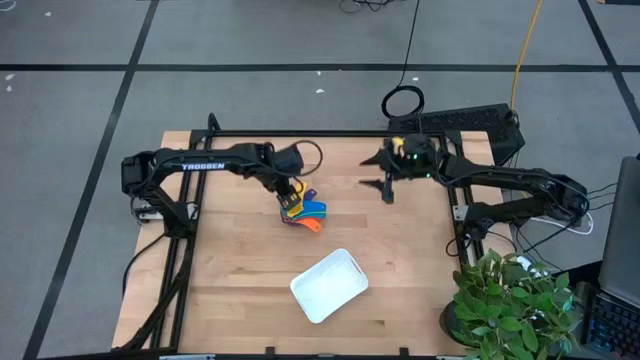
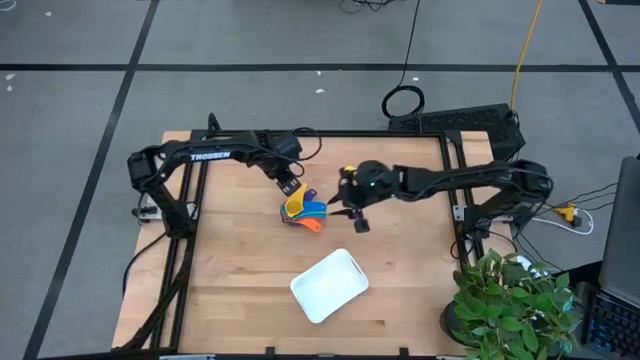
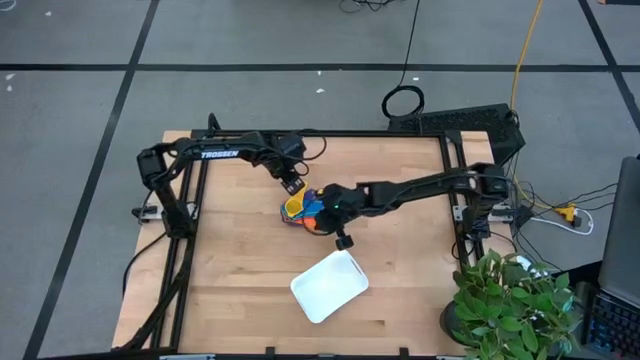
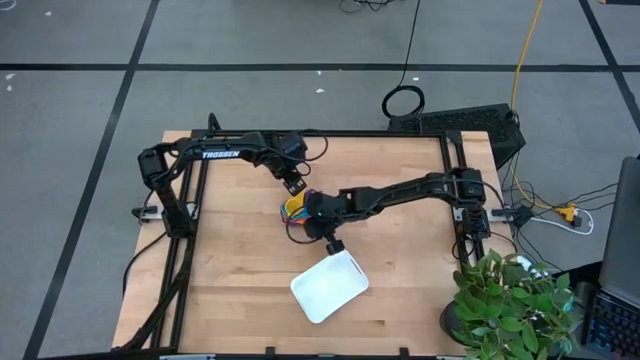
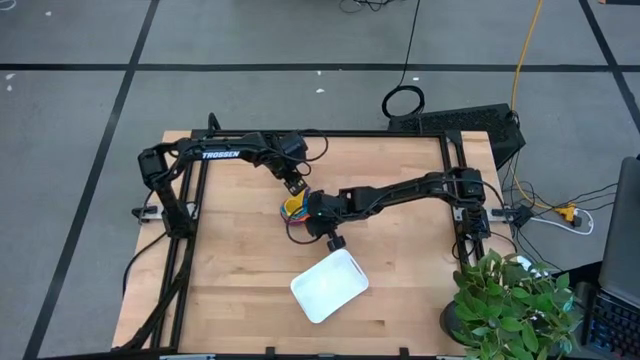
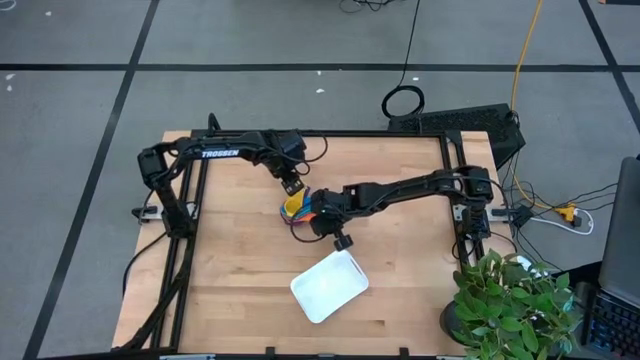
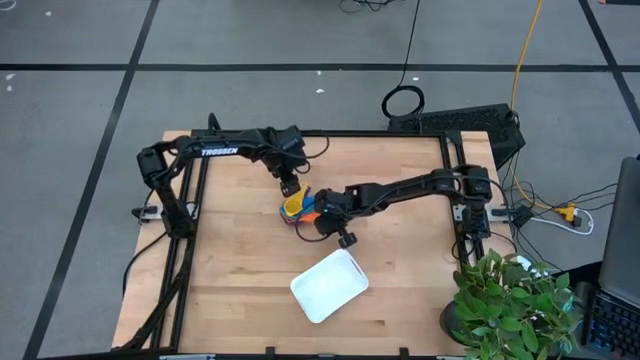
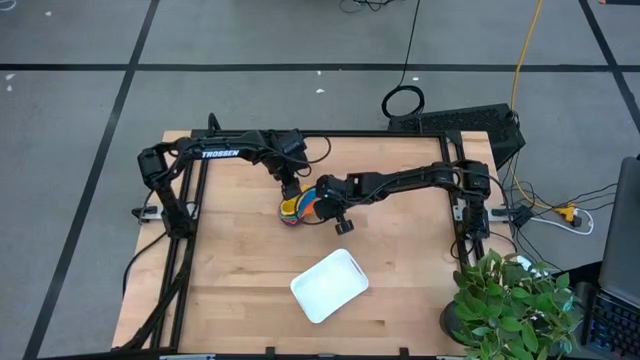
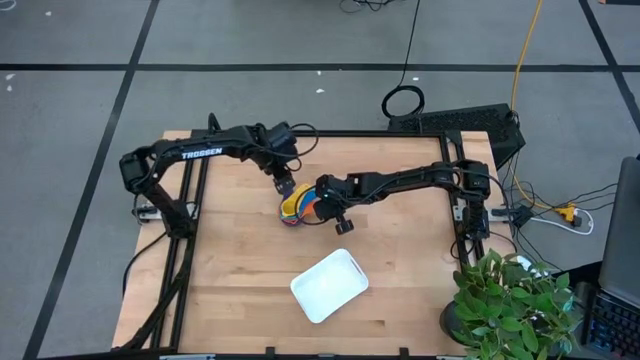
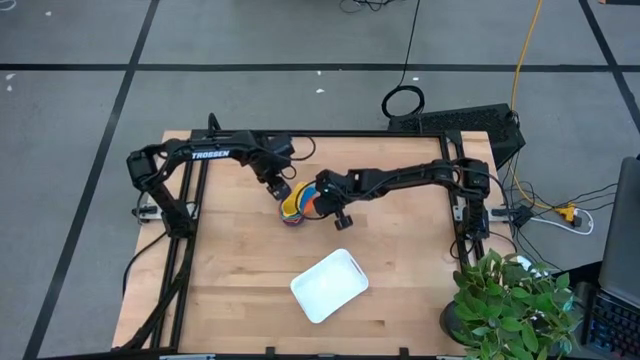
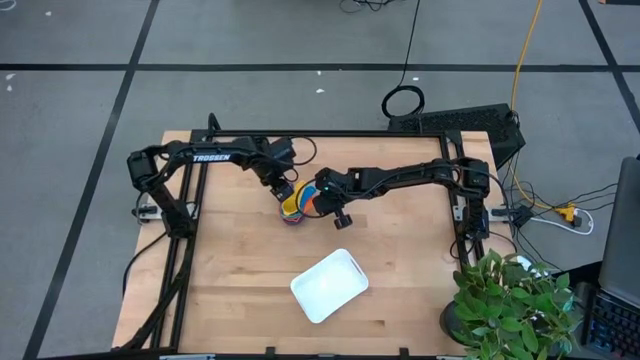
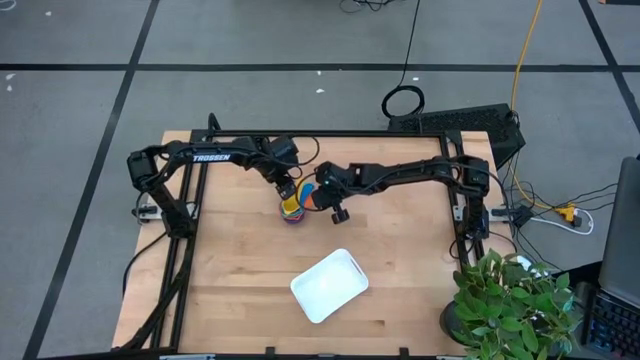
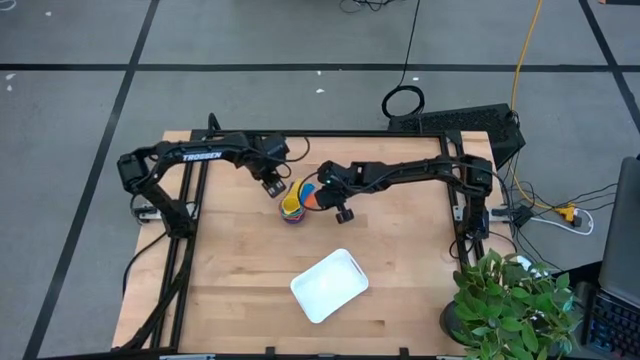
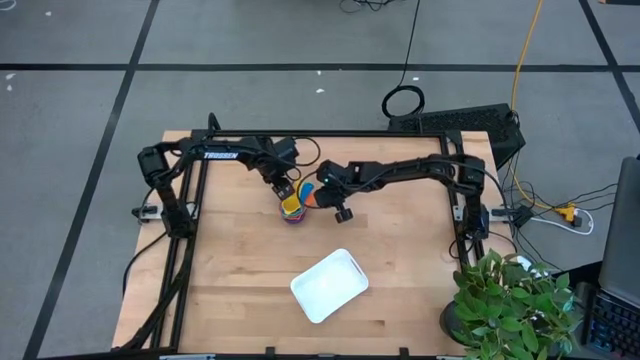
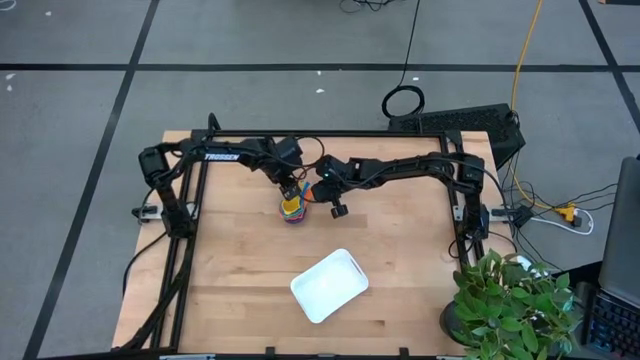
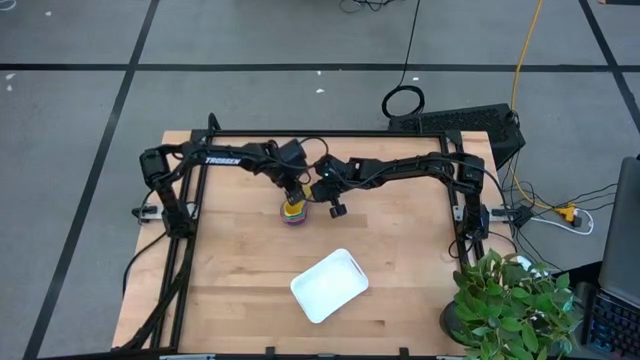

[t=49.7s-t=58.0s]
Task: Nest measuring cups in basket
Adjust nested measuring cups

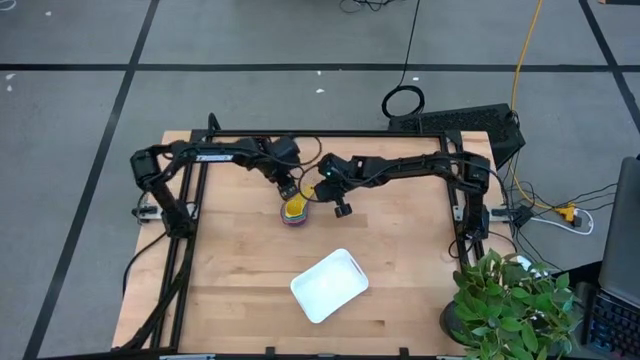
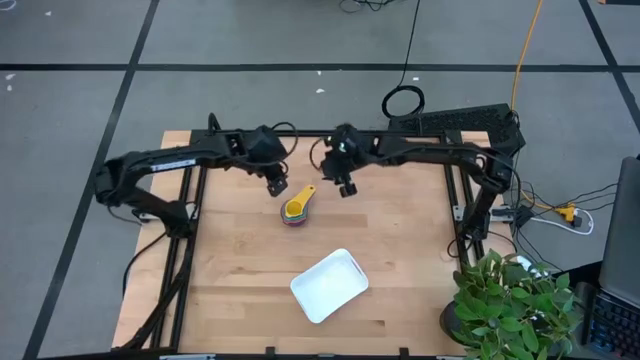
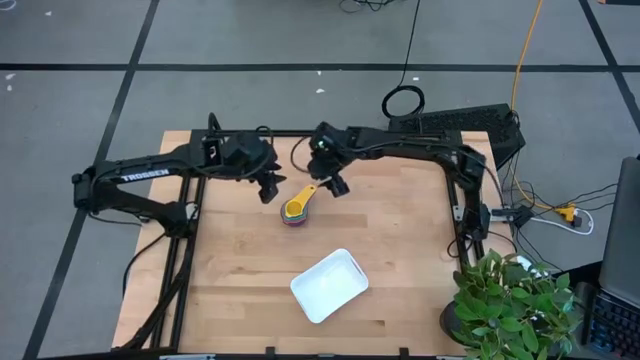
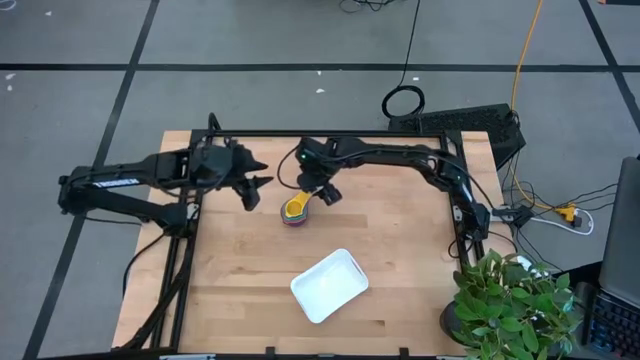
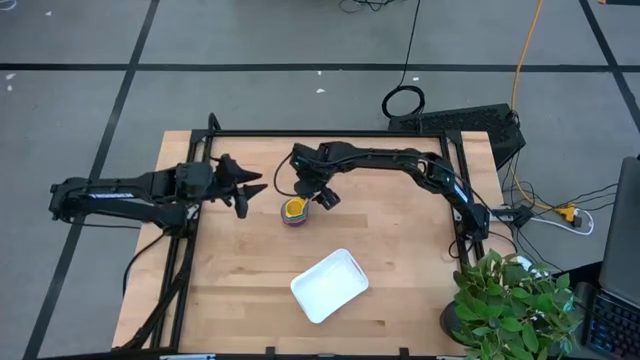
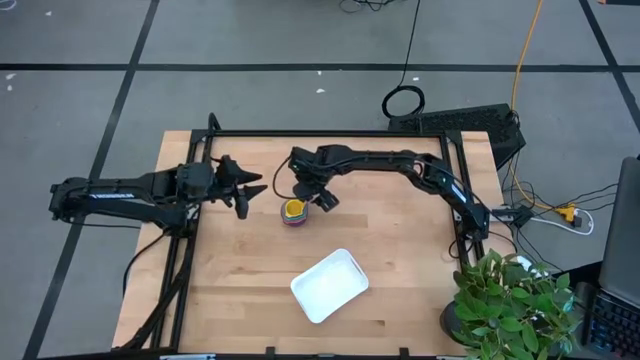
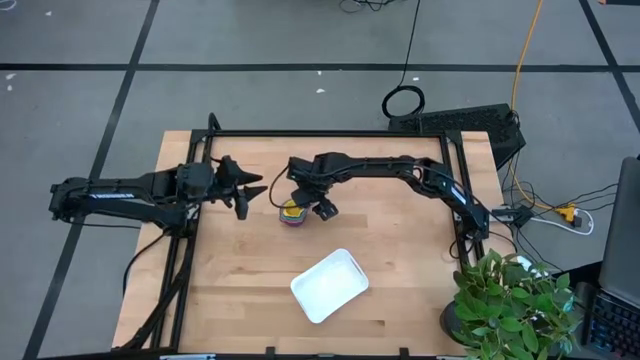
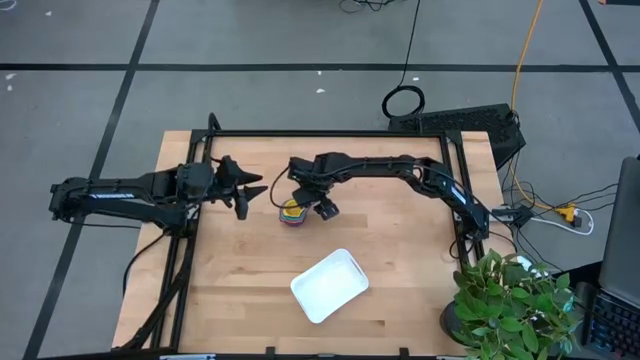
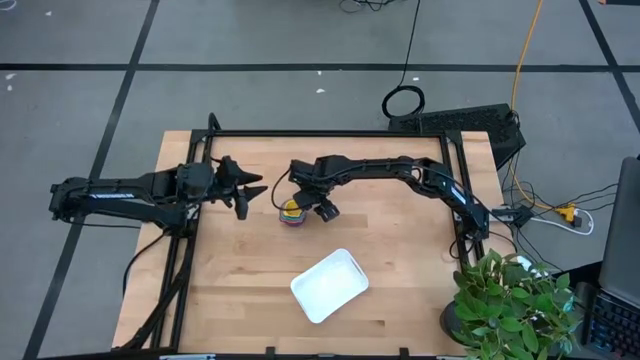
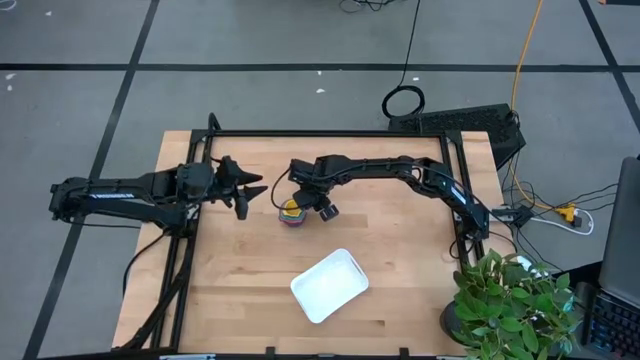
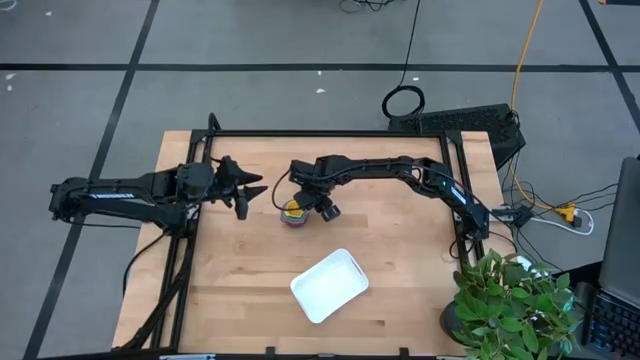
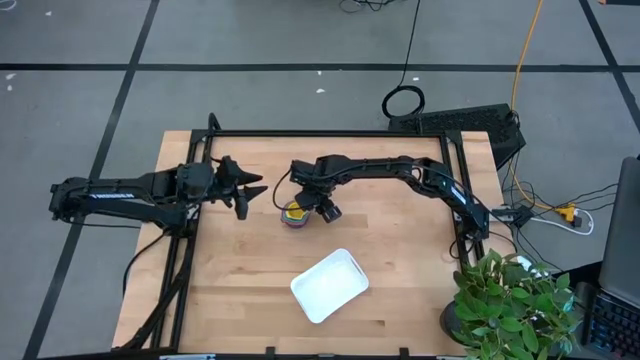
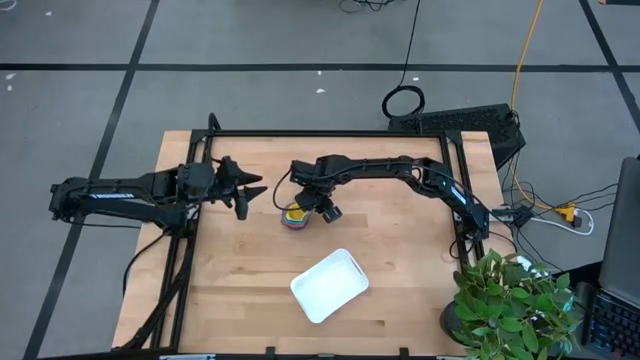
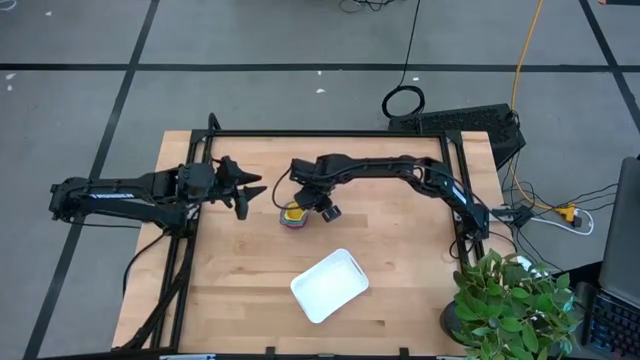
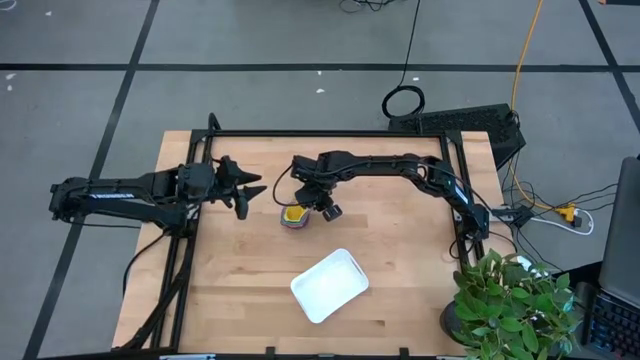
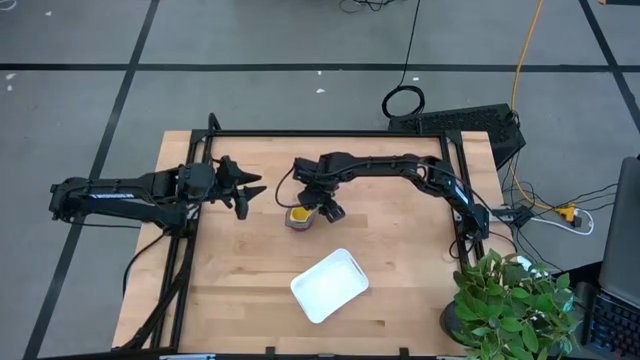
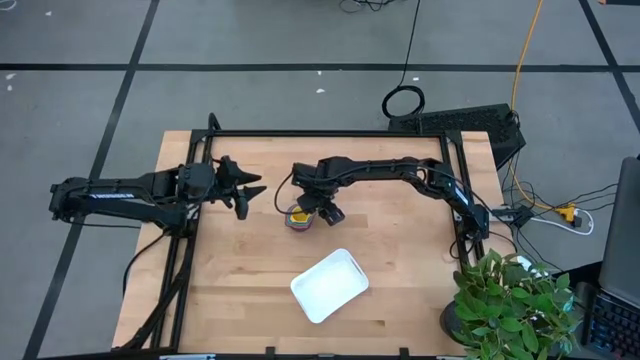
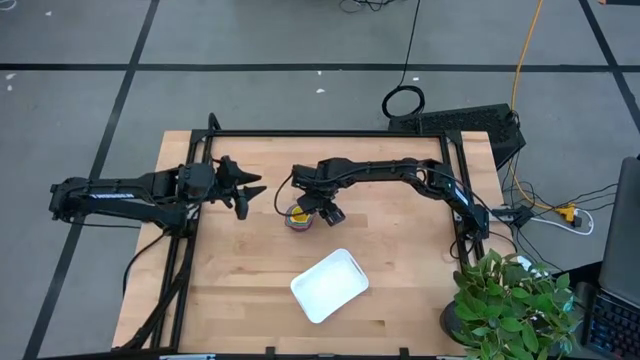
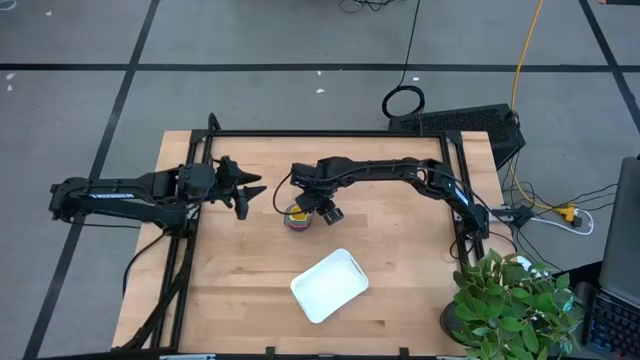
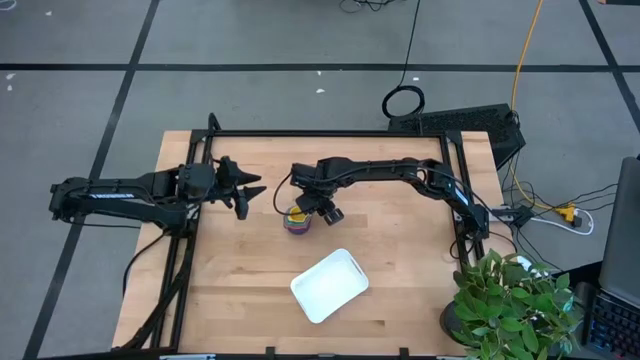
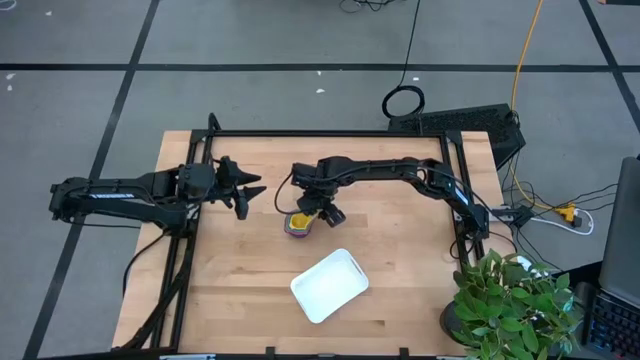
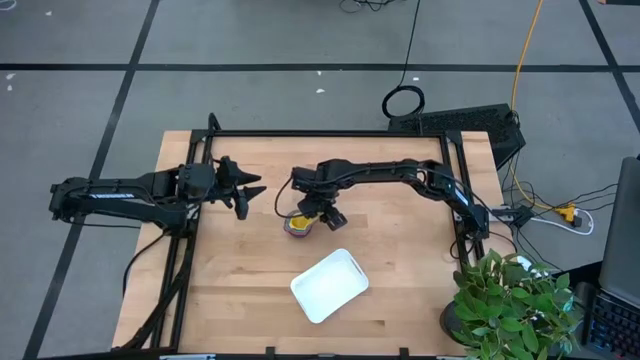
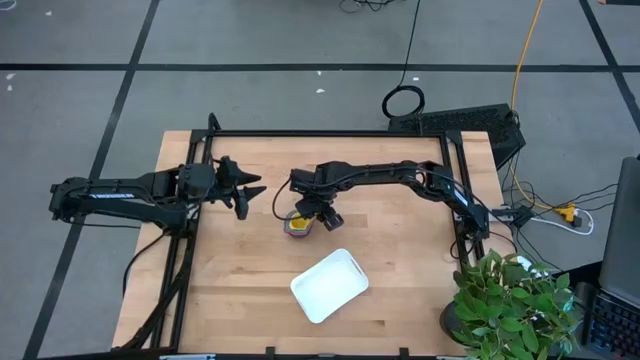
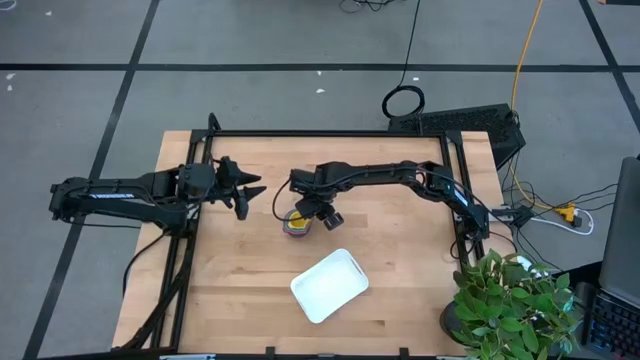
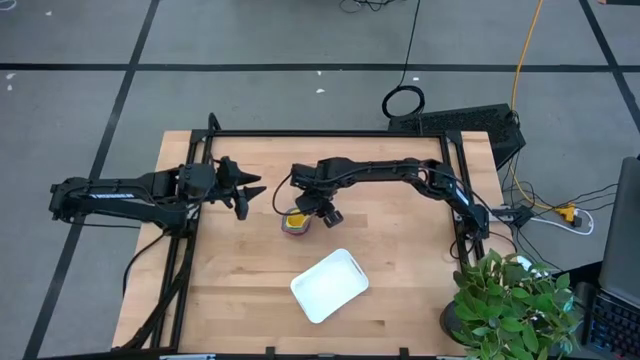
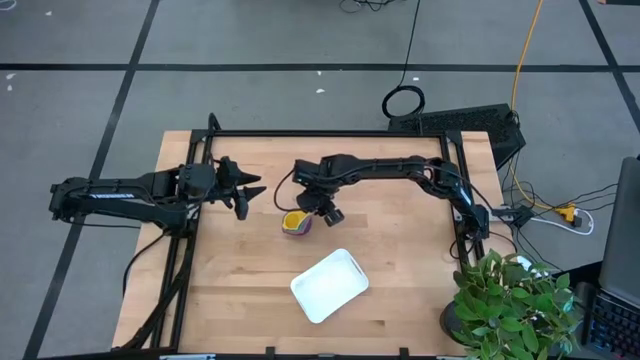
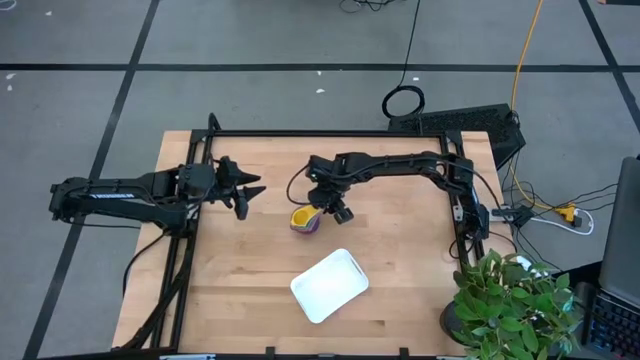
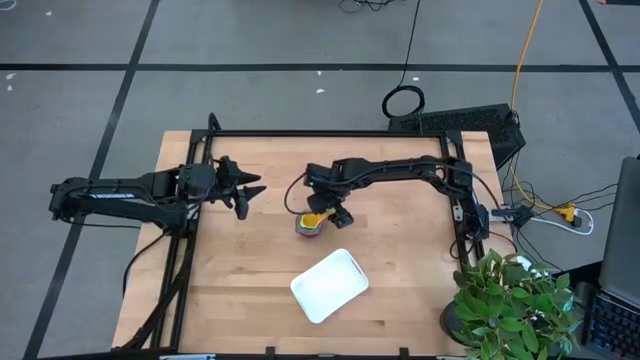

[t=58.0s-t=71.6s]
Put the nested measuring cups into the white bin
